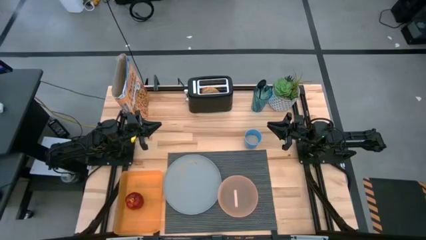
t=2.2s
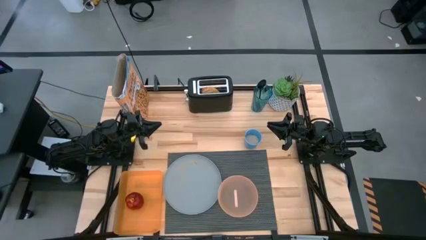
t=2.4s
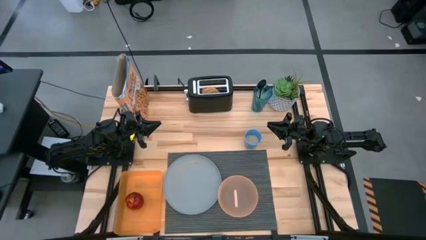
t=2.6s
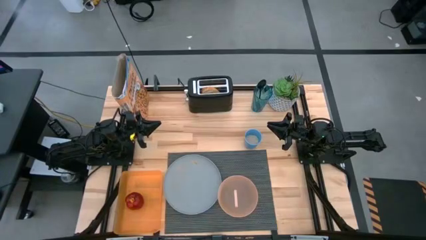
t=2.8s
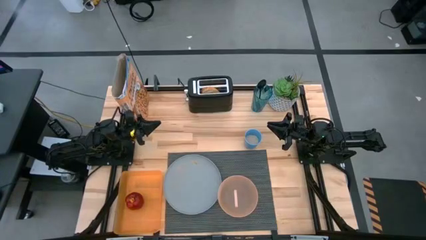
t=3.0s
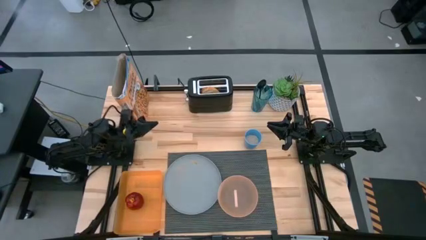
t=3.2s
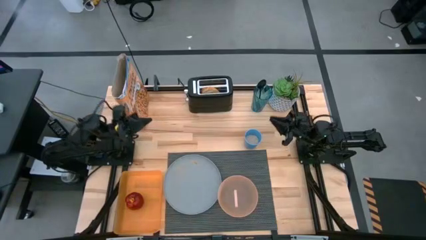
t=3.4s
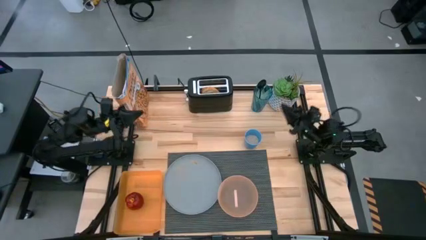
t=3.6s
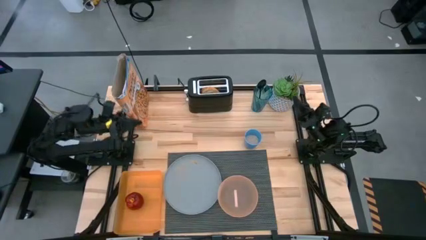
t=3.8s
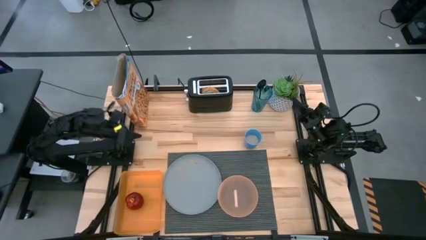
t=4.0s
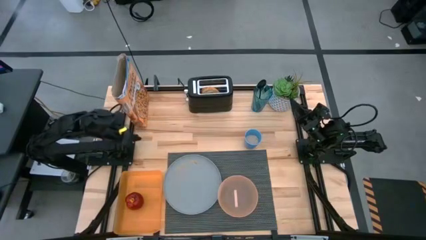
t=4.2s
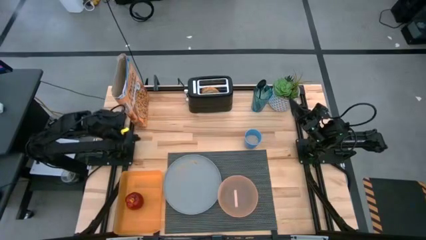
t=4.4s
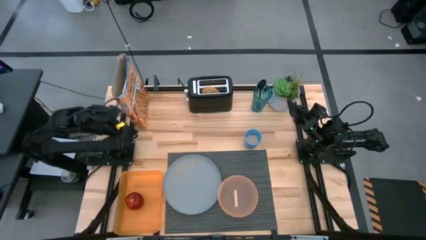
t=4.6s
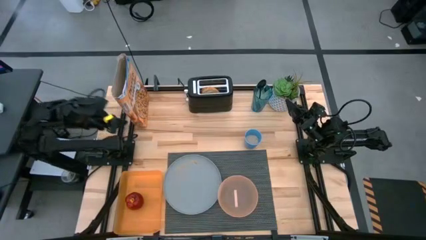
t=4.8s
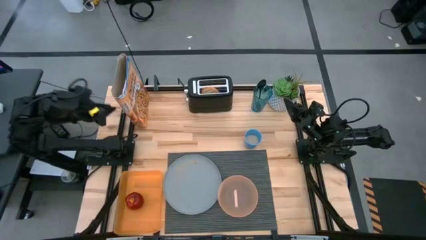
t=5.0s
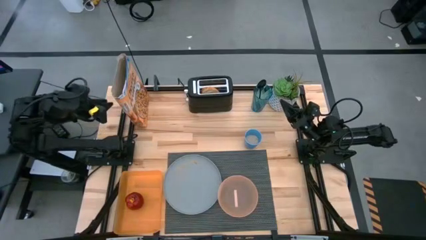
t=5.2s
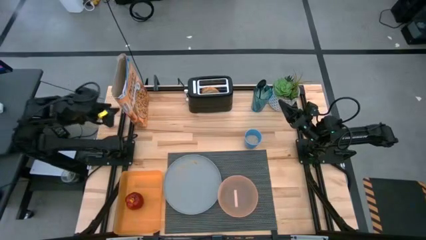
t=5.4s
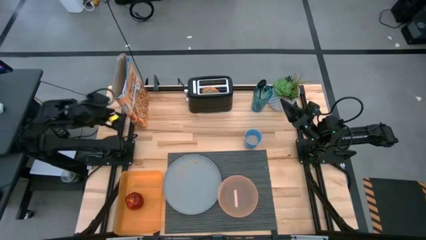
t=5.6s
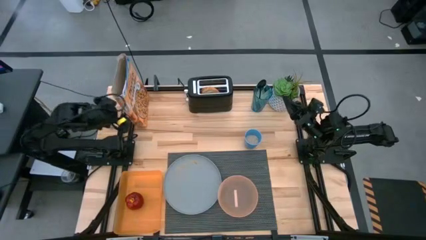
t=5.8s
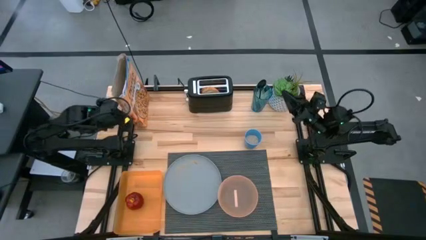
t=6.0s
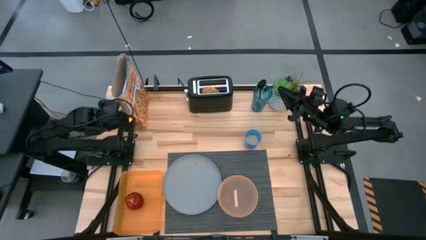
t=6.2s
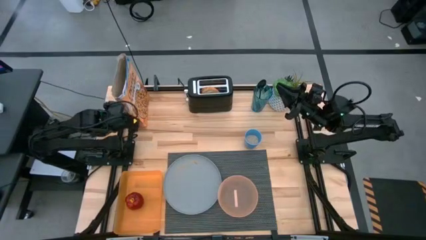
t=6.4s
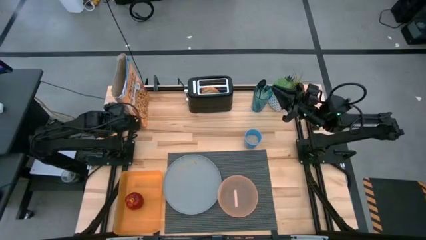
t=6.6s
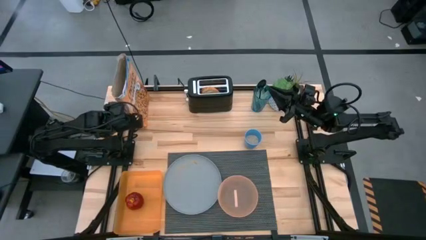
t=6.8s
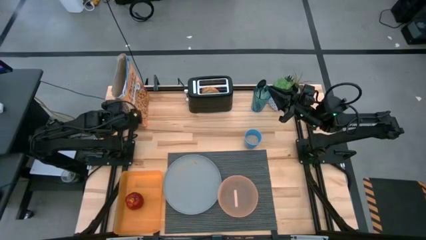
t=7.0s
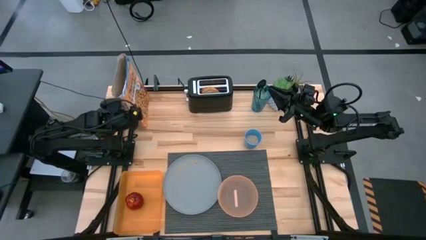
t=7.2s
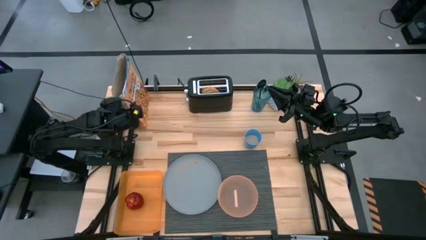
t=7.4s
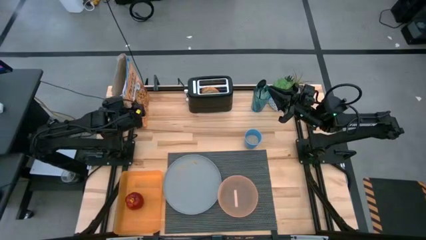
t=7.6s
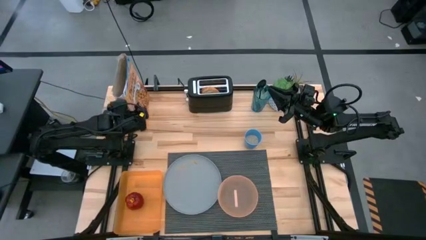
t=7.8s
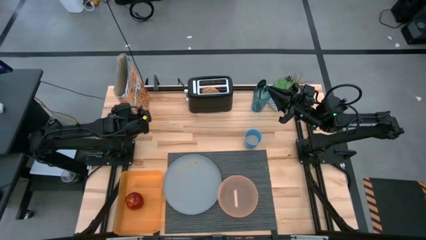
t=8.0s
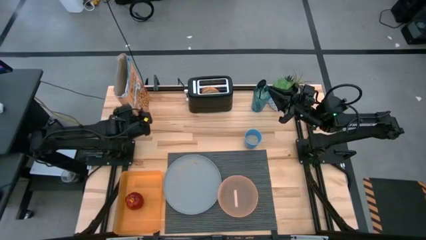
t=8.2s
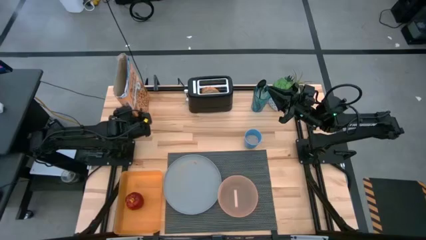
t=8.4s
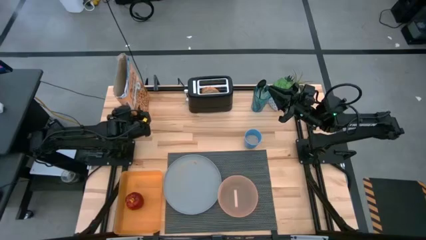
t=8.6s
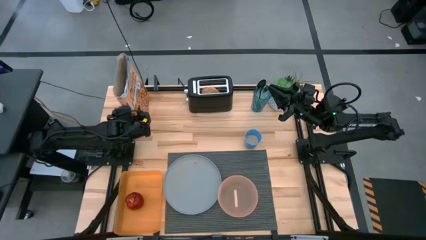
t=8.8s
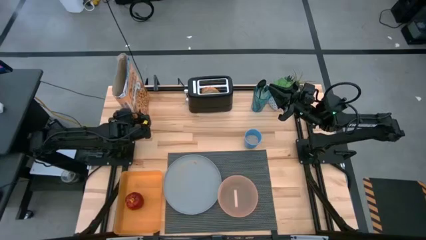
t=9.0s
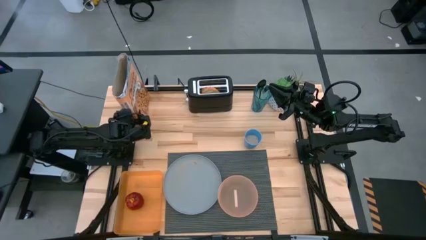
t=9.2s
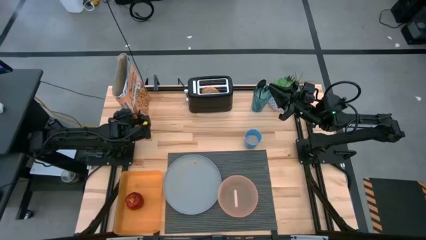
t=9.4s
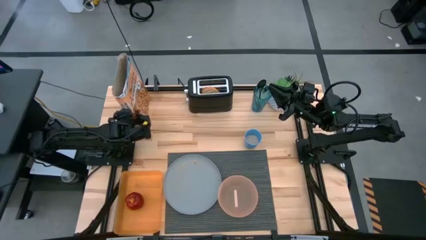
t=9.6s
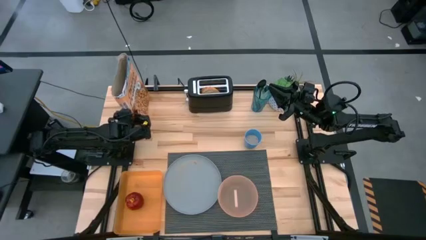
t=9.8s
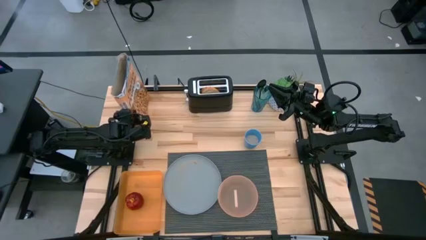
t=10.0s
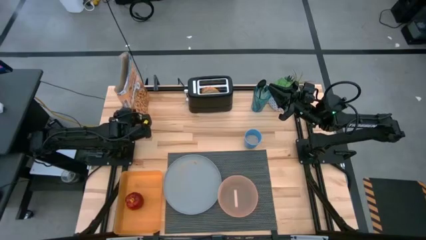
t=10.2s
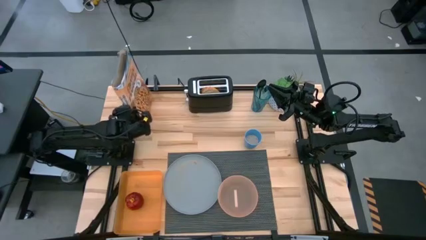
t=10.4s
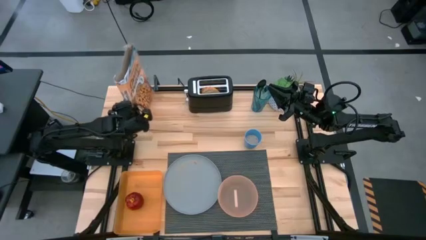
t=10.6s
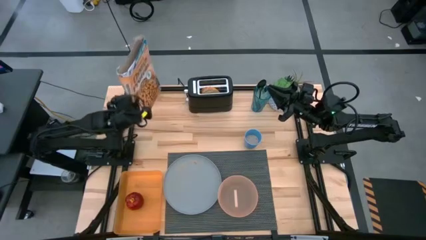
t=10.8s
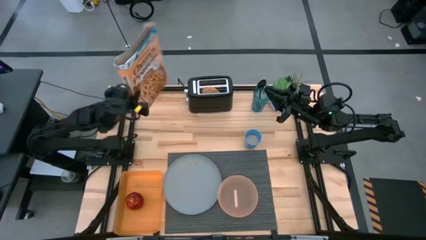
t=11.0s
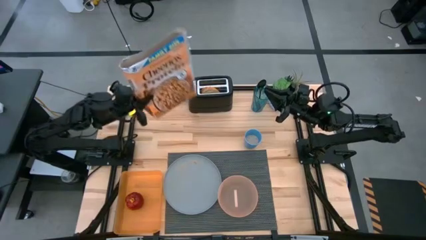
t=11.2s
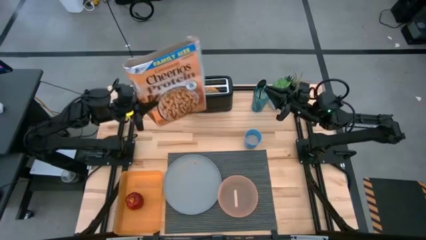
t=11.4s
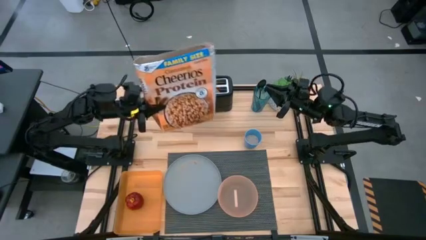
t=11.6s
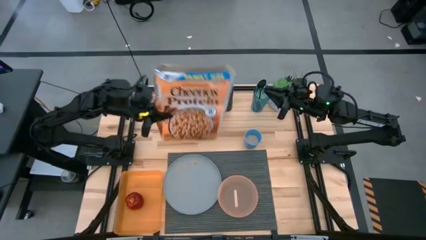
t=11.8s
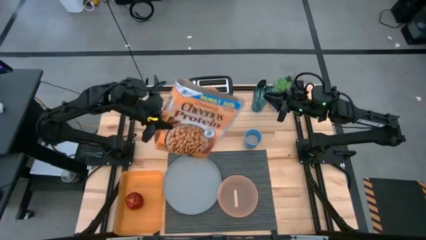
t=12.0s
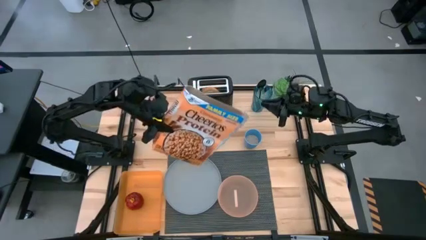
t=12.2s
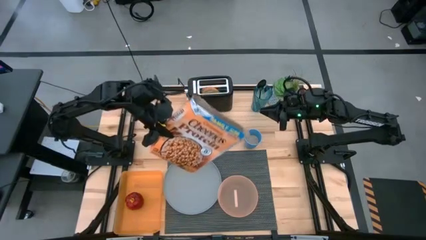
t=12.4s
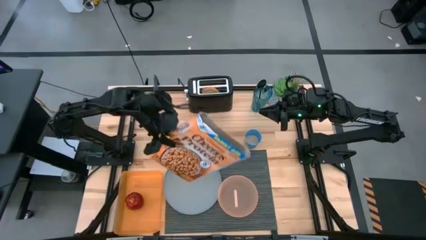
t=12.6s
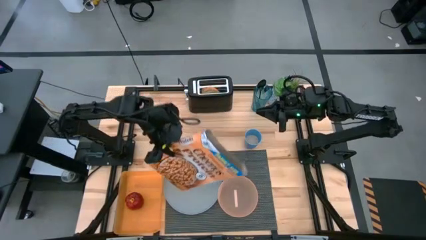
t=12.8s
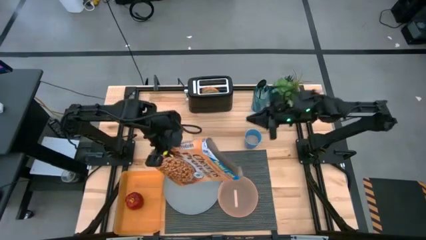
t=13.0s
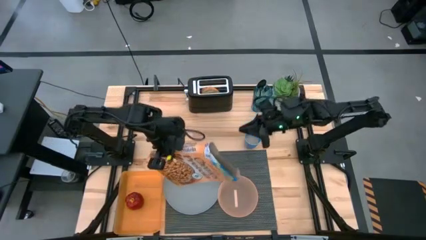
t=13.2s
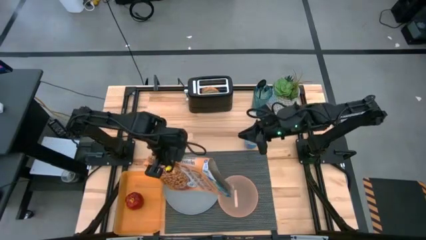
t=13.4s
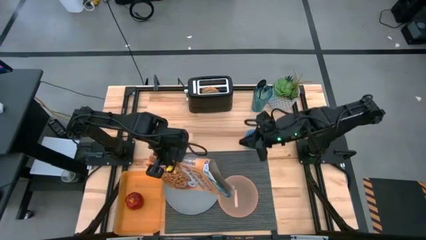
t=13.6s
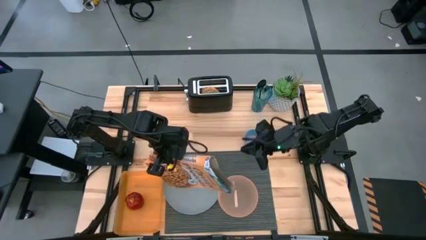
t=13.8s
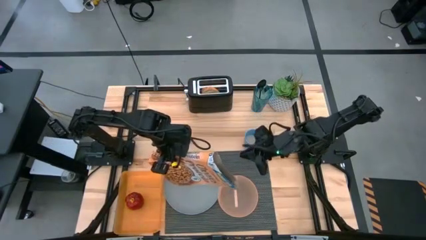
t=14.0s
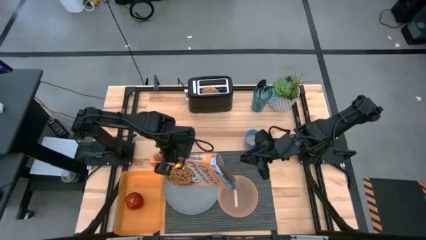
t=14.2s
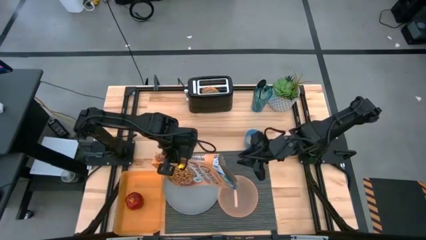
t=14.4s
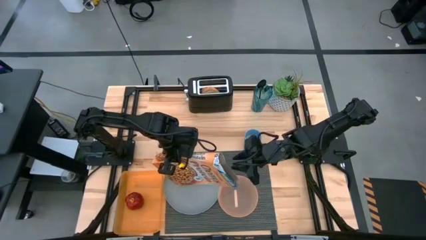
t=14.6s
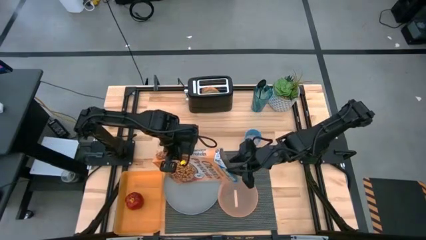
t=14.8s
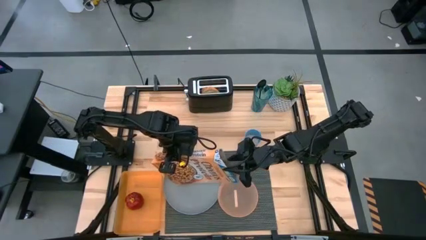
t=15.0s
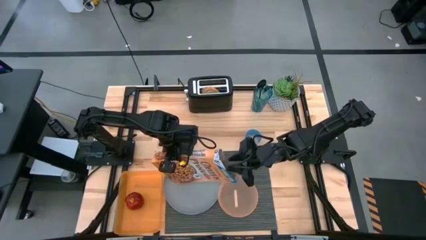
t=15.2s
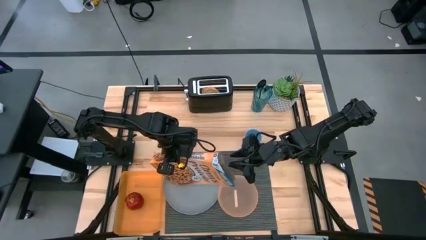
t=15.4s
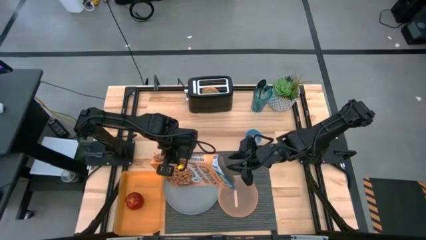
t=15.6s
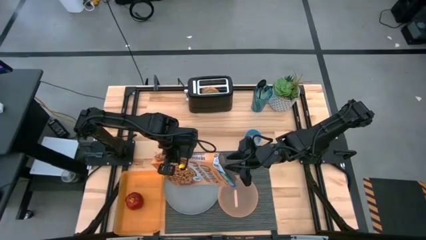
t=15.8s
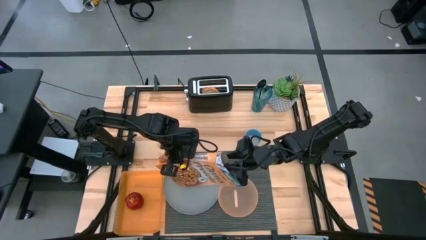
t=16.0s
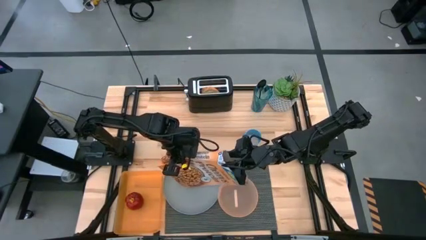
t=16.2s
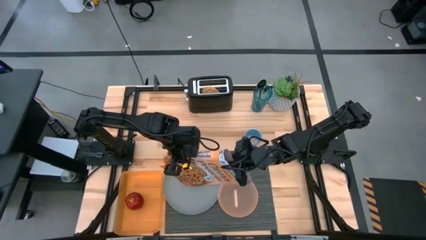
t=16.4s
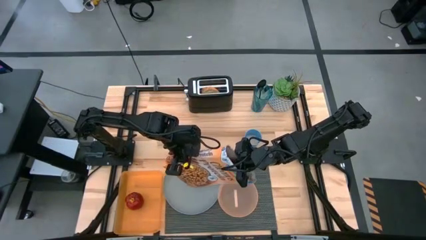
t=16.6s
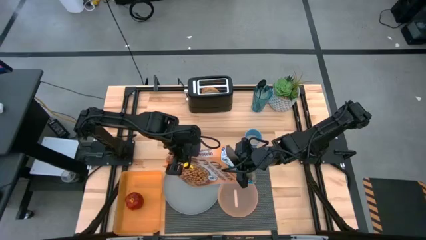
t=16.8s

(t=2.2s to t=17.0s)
Task: Arrange a breakfast setting
Pour the cereal into the orange bowl
